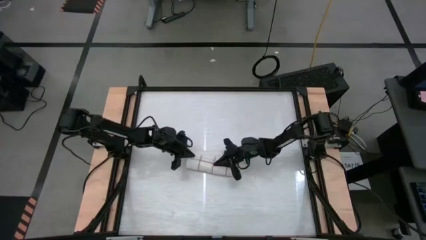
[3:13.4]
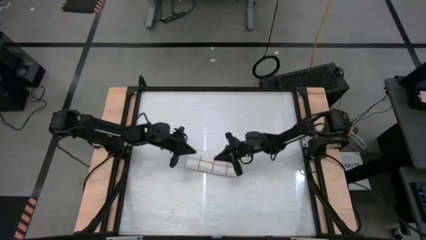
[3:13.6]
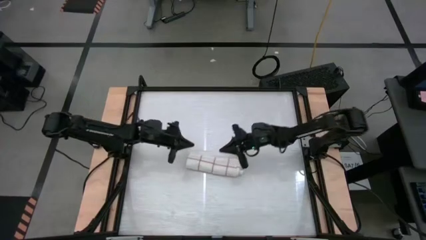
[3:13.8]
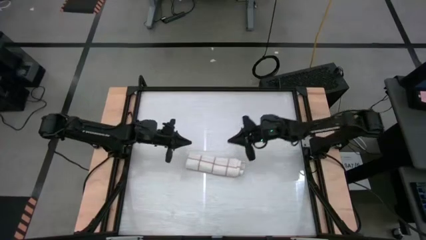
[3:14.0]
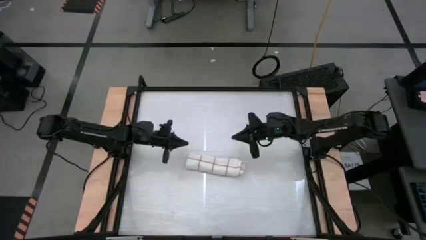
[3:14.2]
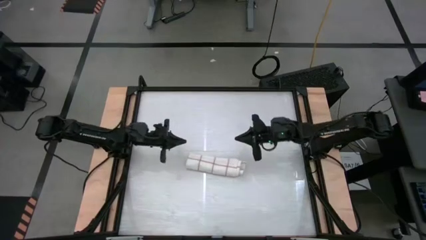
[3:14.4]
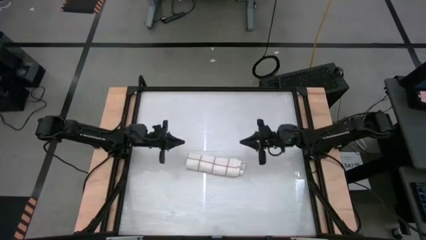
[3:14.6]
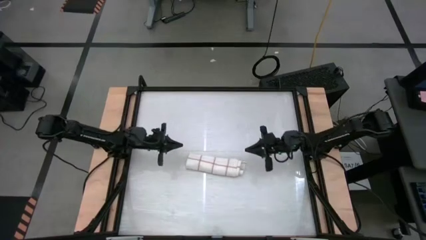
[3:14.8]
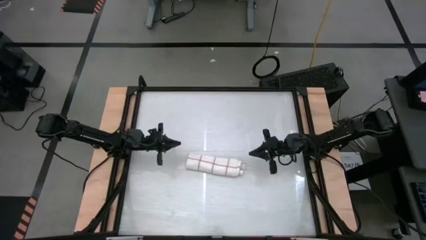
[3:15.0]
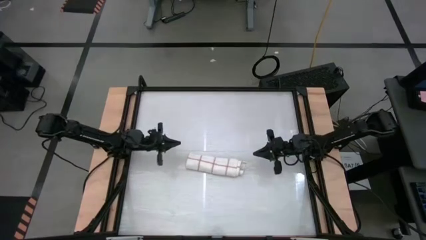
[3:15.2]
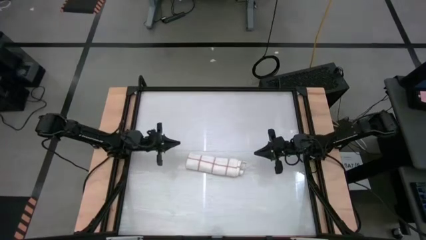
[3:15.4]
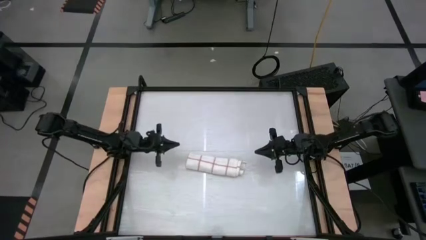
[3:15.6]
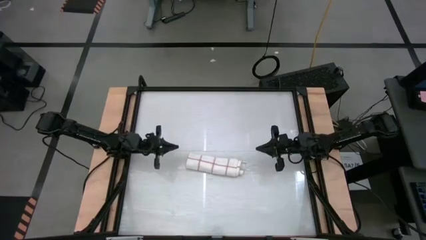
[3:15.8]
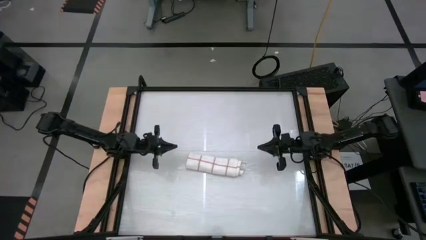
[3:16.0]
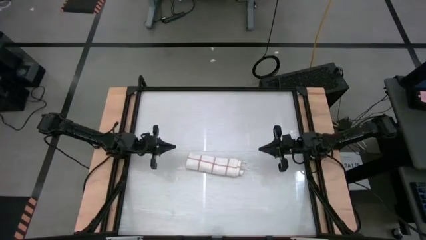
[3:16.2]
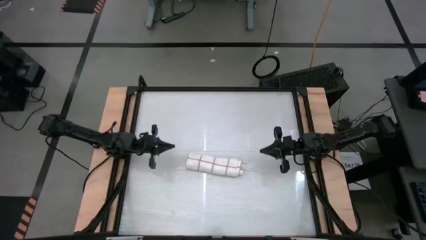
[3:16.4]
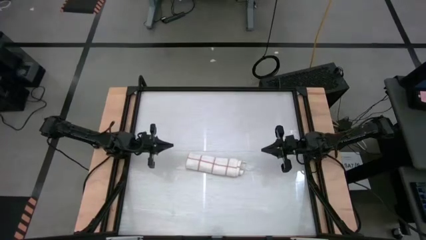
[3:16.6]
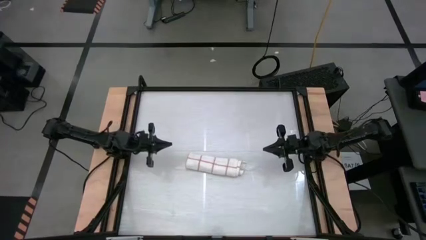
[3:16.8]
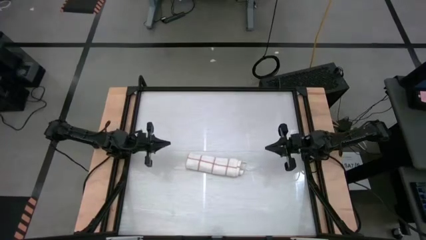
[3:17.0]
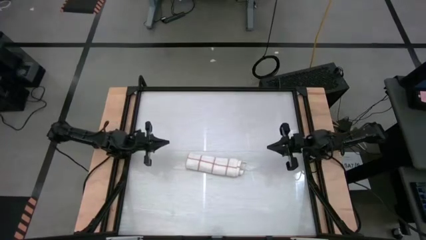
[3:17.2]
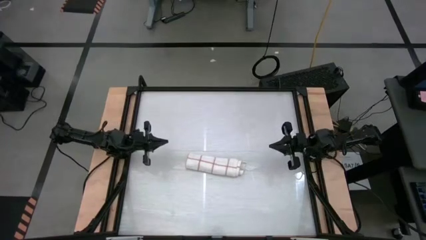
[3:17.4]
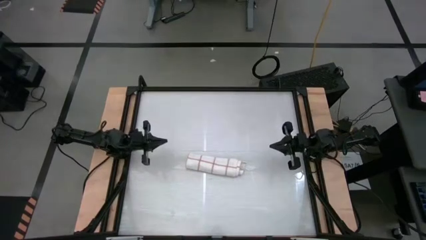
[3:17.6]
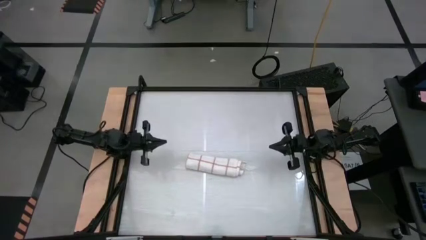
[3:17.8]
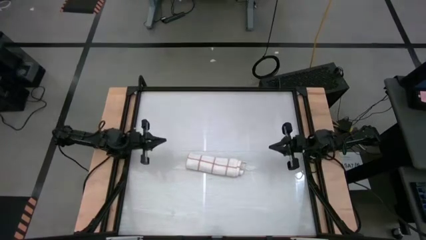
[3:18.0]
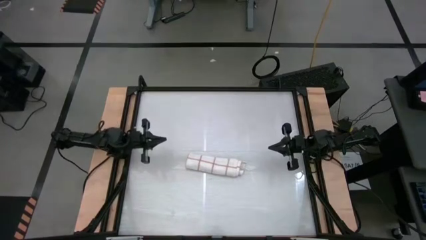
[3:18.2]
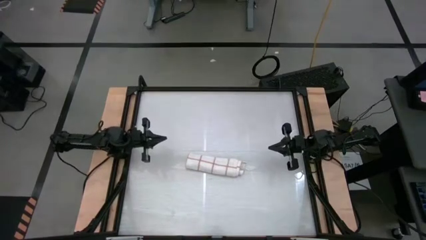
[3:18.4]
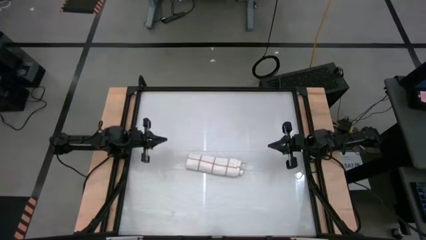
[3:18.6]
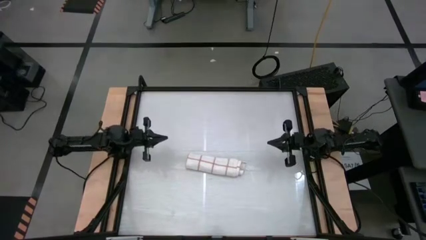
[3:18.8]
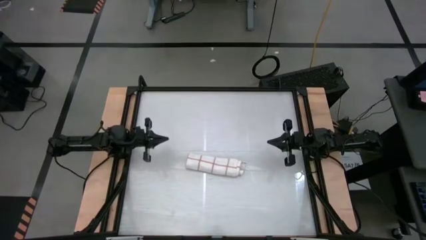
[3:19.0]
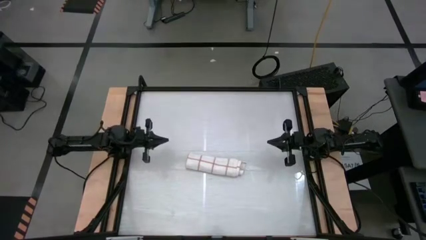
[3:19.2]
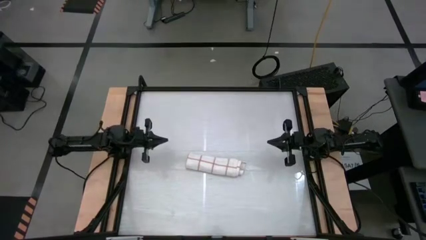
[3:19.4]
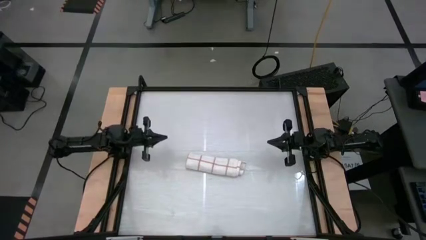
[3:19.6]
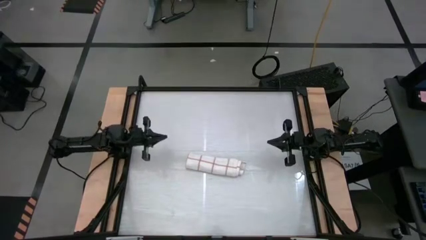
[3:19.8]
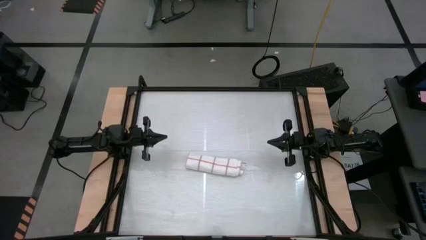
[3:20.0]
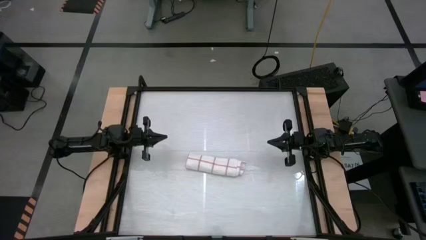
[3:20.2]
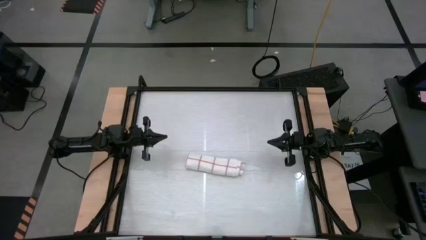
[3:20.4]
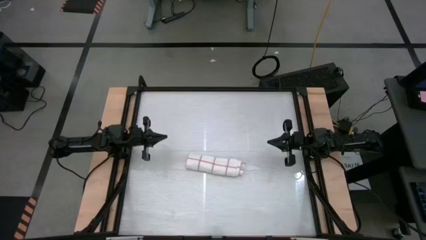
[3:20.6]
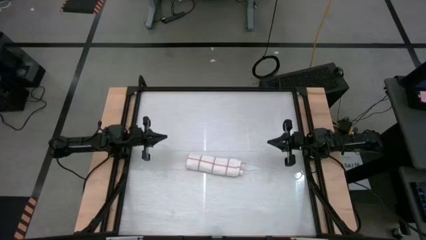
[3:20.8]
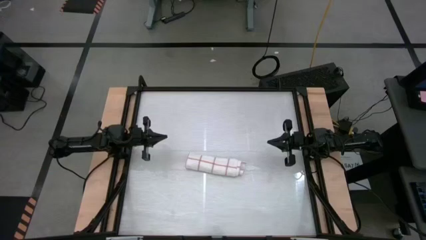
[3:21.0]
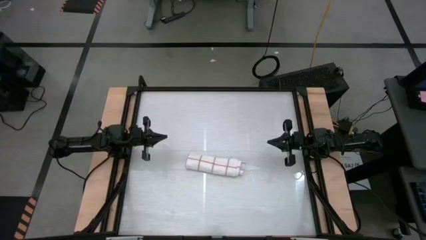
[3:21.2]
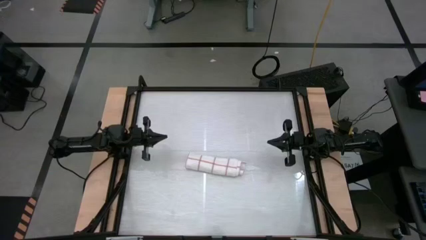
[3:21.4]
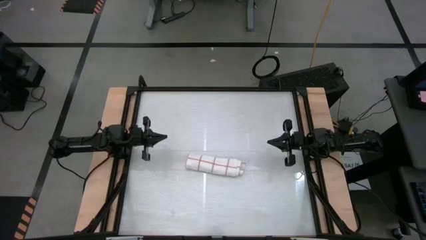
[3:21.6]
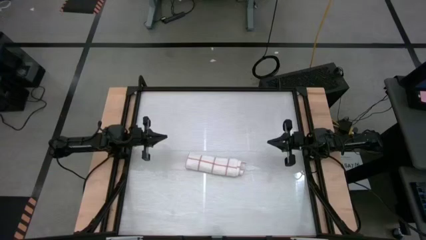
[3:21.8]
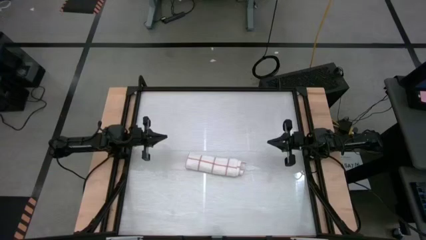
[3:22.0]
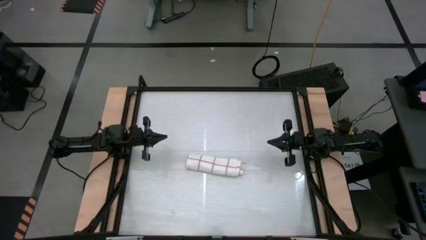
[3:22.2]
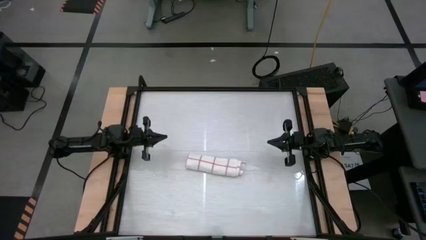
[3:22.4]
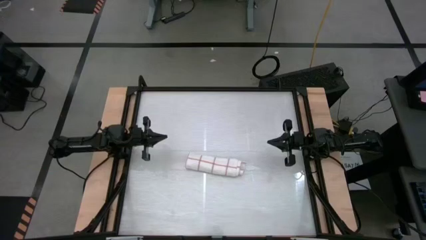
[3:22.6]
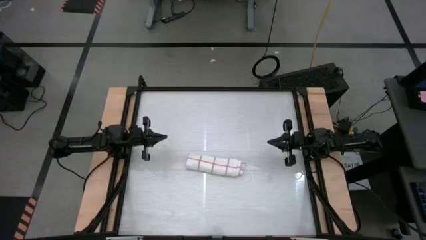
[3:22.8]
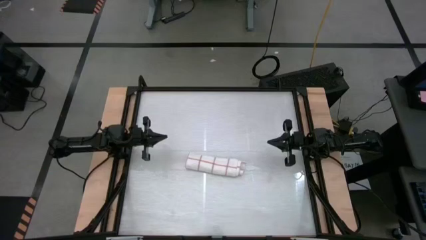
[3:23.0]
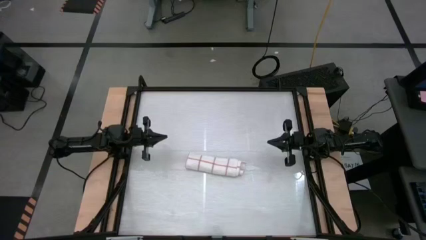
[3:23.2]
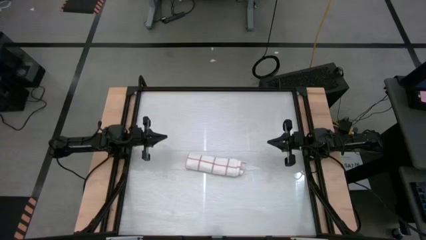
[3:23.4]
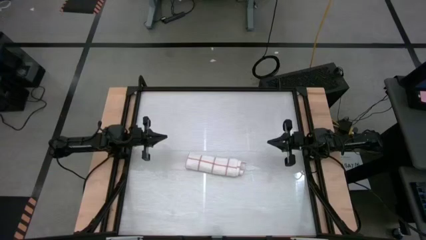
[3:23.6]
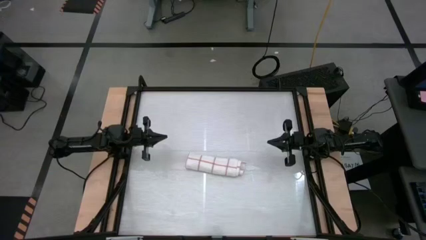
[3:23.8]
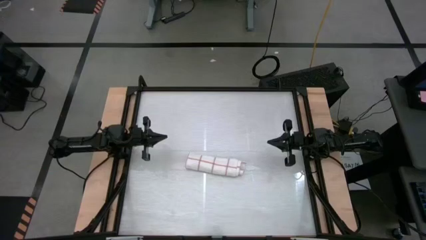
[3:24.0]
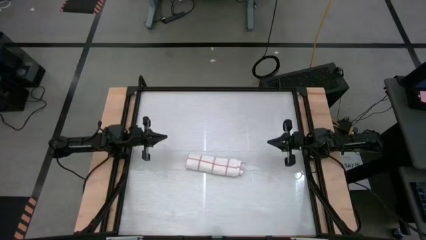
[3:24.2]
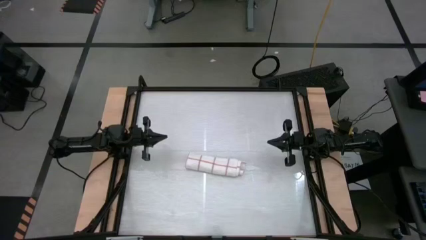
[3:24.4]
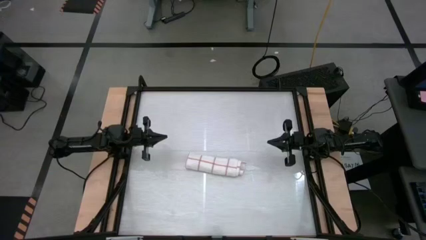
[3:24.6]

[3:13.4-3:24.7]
Task: Roll towel
Return to Home Position
